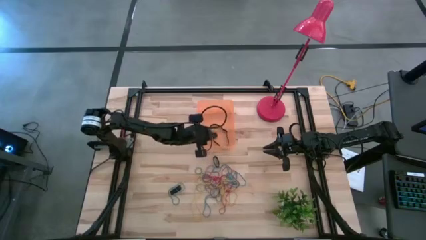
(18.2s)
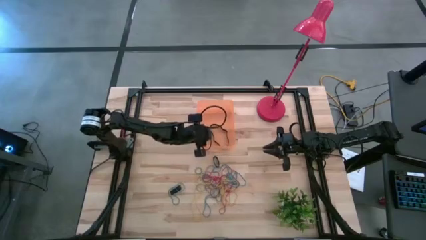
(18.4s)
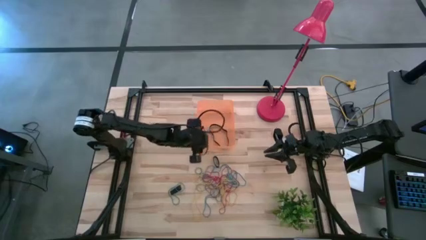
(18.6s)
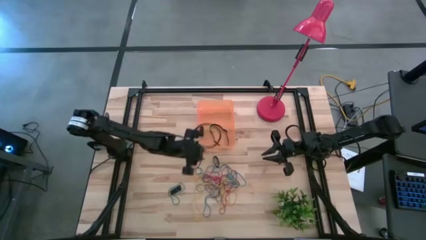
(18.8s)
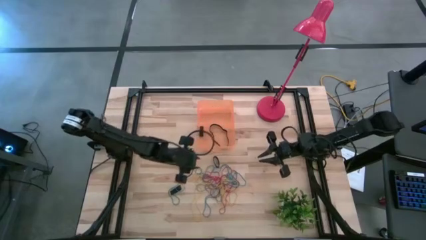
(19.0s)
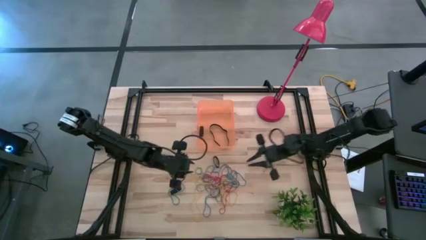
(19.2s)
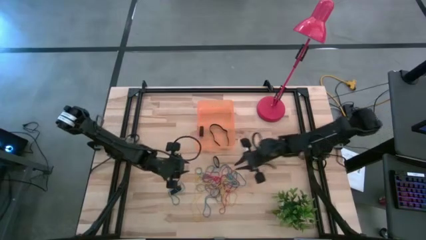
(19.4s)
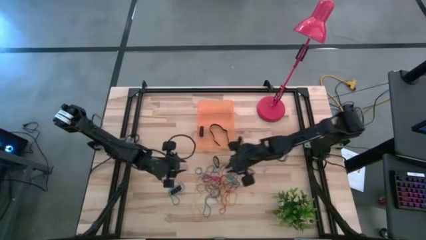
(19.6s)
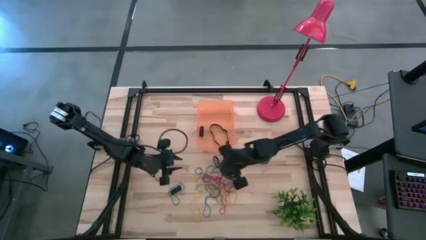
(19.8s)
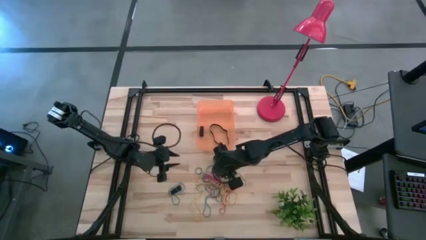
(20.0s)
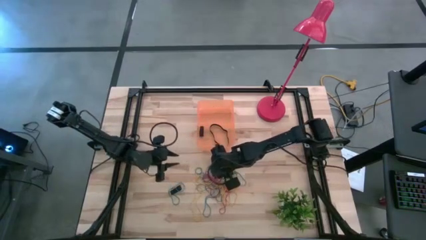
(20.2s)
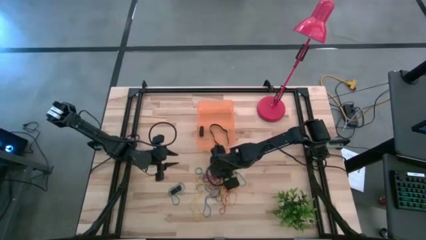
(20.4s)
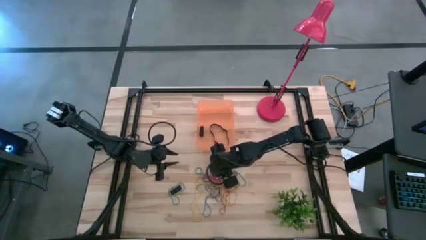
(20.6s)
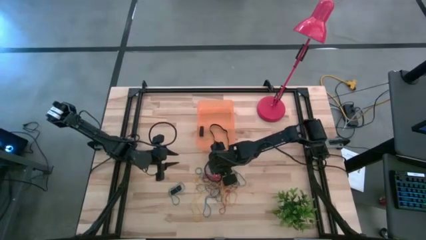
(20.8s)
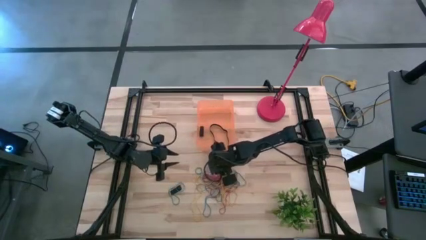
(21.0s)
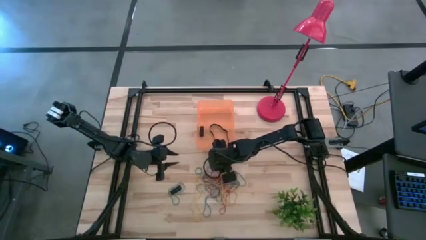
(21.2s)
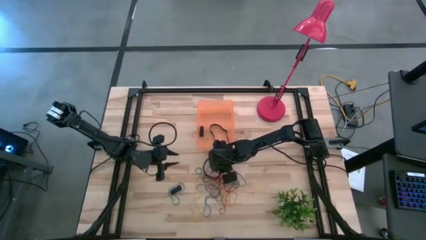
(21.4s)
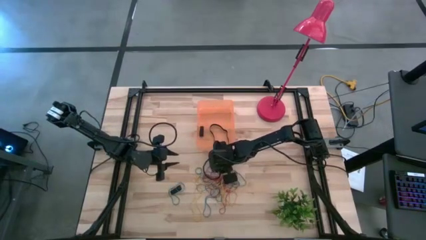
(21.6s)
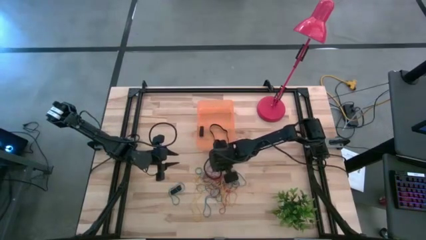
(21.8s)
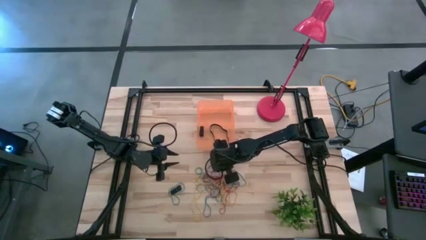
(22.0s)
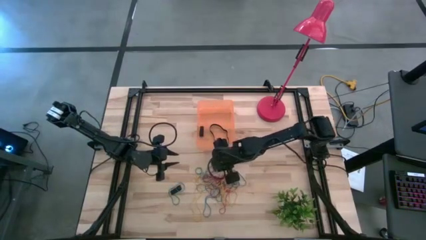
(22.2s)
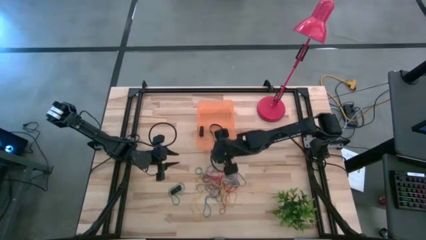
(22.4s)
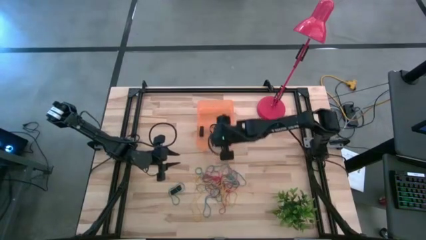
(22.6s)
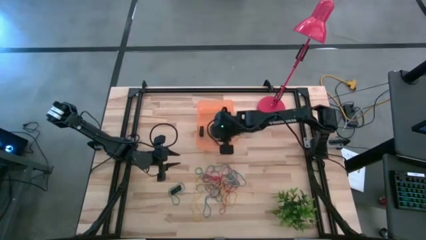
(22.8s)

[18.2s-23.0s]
Task: Pick and place rubber bands into bin
Put the black rubber band into the orange bin

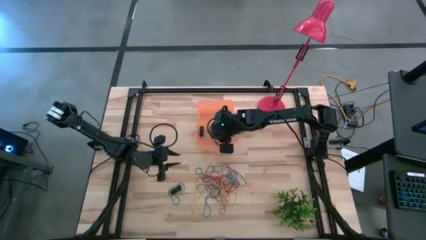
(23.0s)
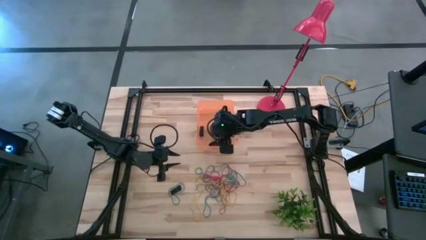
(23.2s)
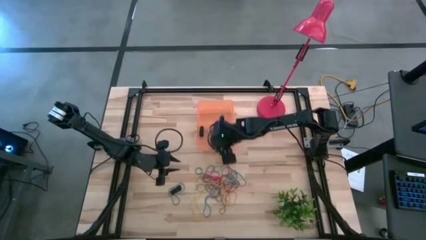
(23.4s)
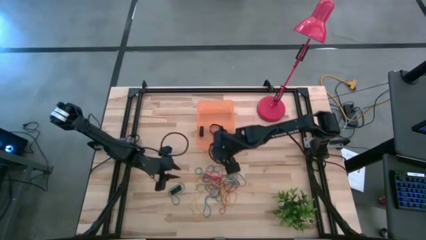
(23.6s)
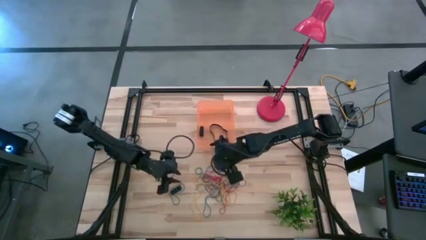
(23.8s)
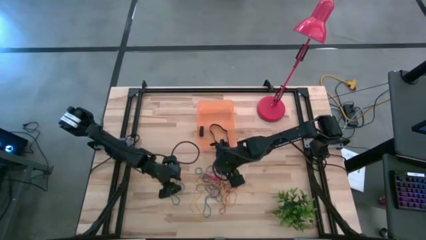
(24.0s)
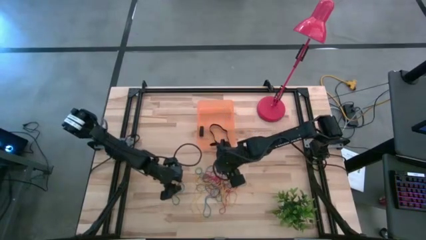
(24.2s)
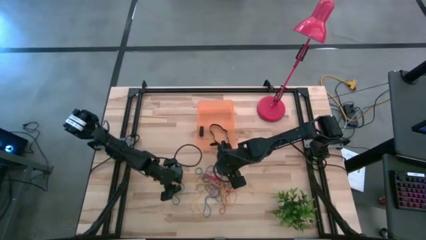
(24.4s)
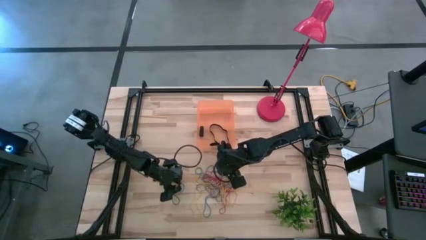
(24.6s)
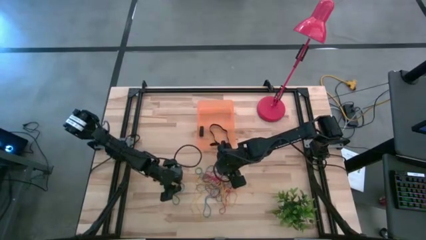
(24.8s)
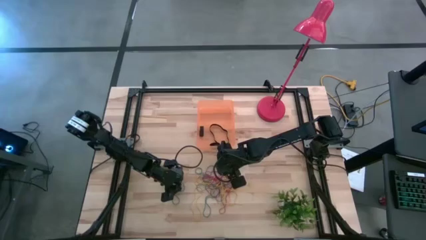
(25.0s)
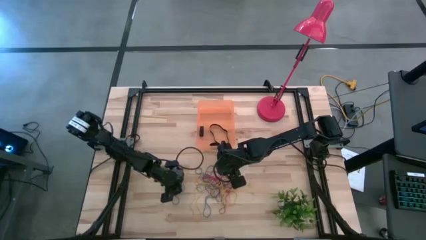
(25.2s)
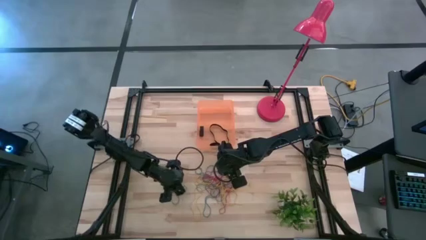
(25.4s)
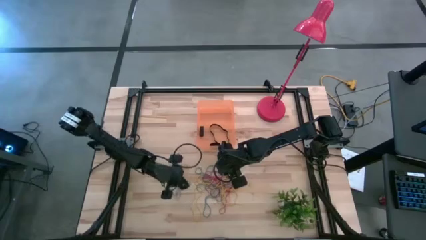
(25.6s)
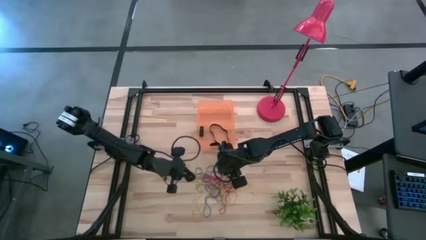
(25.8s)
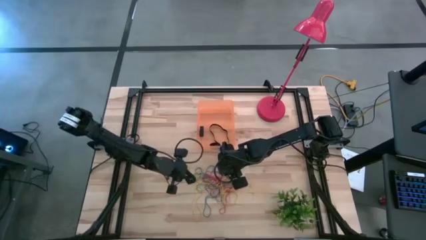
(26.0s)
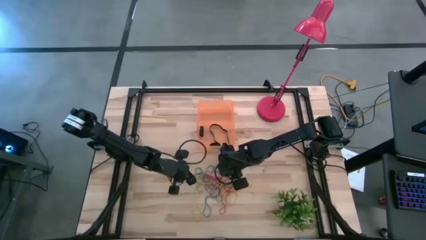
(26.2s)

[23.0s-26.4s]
Put the black rubber band into the orange bin

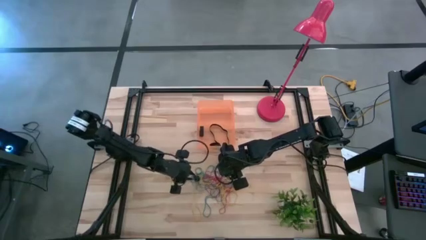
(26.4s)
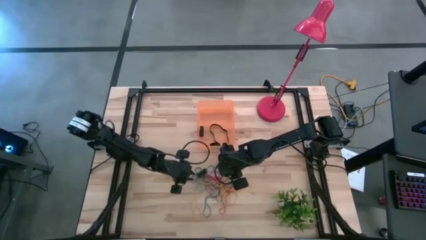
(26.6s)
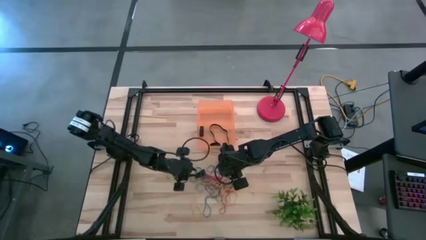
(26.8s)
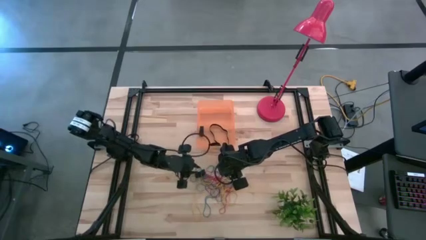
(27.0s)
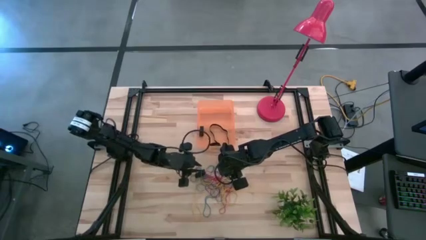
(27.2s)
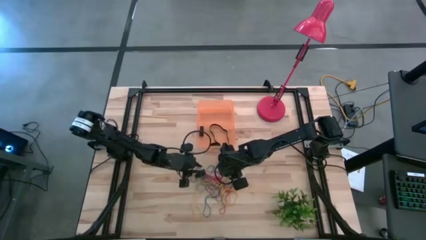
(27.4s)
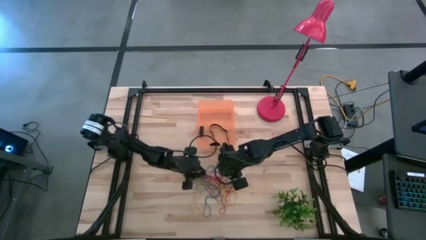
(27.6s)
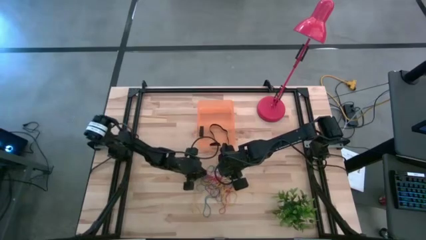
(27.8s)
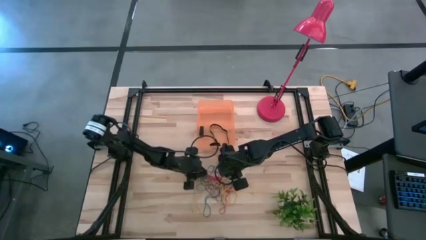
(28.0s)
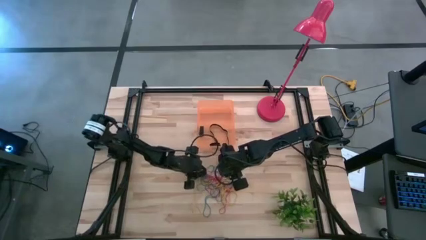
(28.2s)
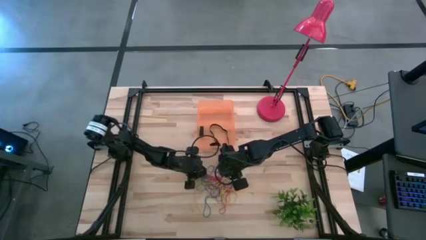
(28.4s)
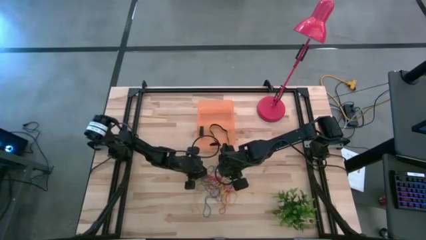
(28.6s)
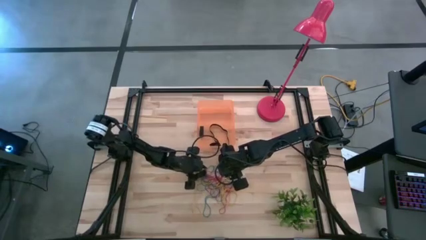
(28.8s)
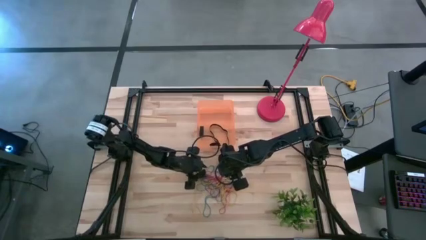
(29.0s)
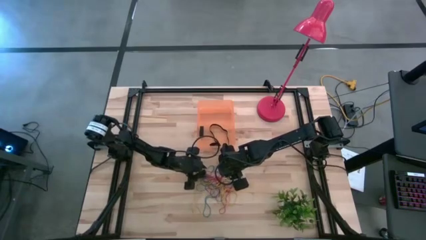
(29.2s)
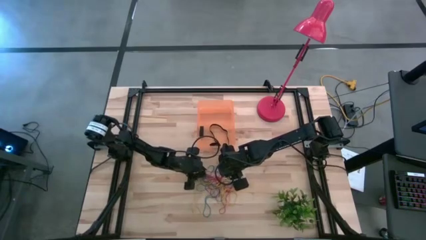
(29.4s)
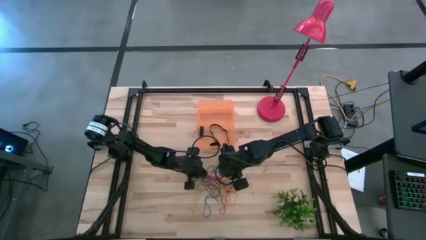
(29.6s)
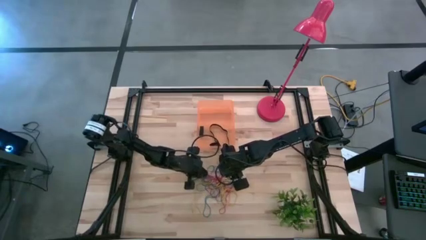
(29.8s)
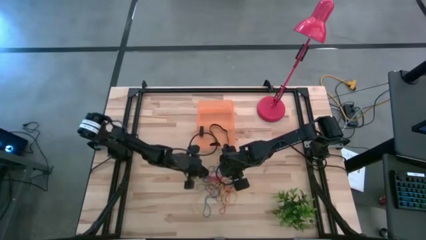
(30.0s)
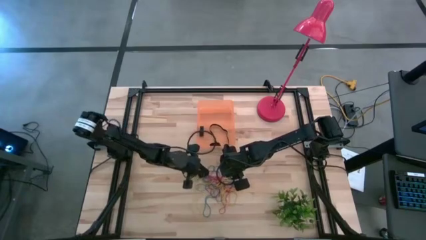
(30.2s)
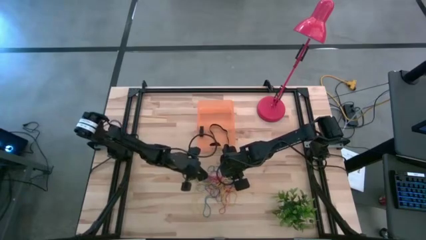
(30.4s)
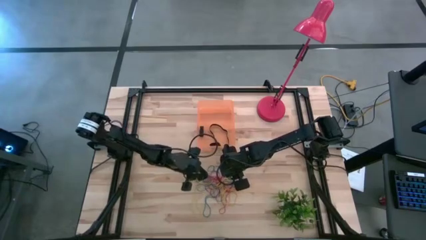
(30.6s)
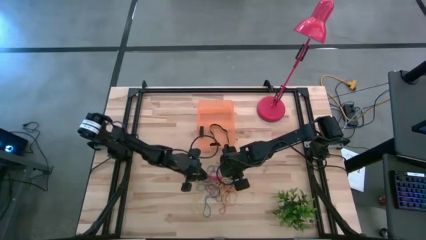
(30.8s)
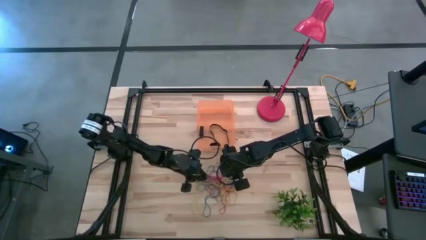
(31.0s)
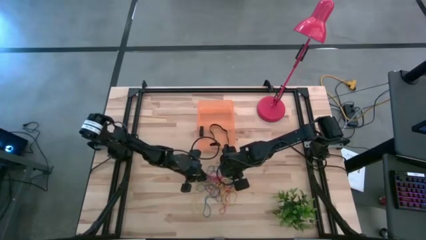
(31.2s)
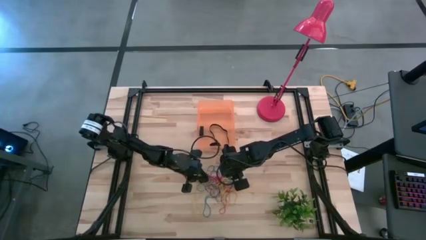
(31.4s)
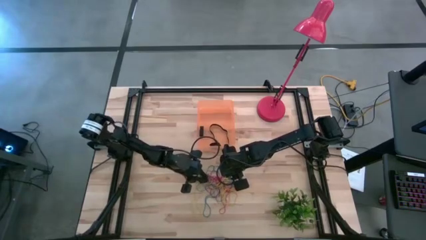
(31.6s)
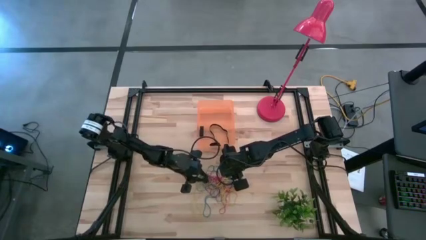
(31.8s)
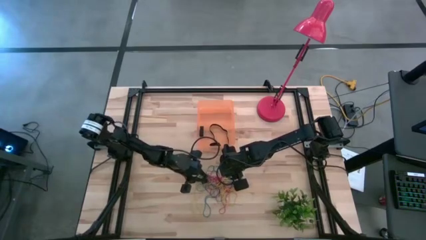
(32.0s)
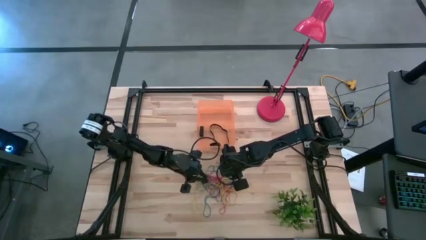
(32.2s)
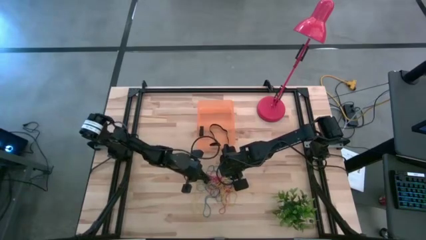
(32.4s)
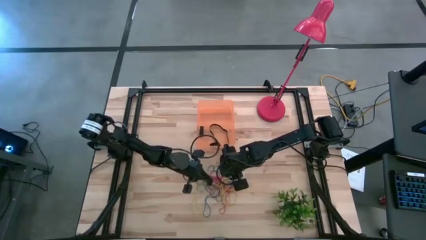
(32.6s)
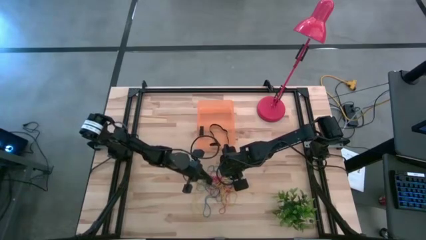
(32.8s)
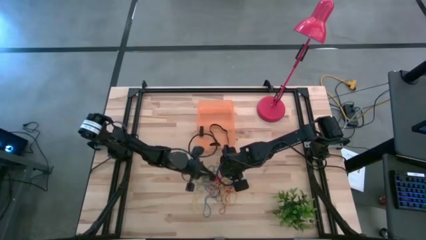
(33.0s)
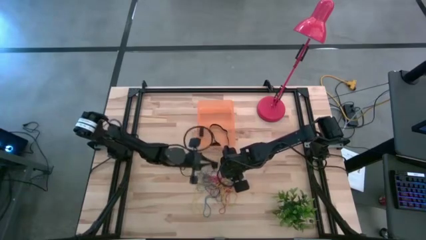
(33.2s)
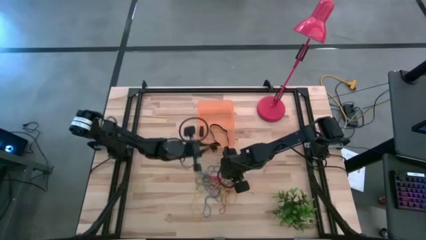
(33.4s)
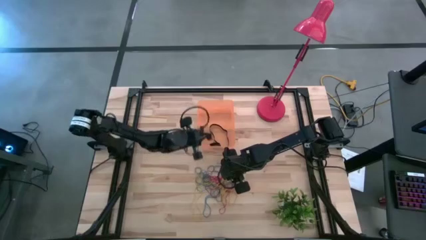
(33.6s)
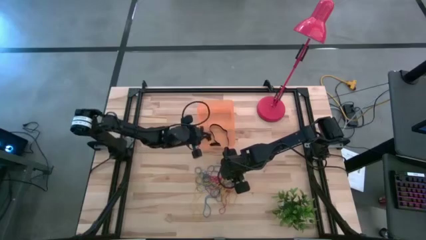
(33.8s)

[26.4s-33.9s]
Put the black rubber band into the orange bin

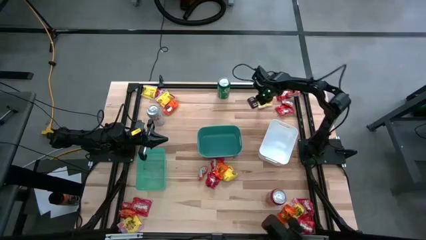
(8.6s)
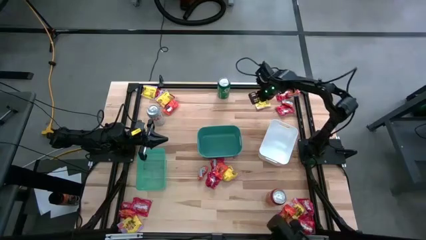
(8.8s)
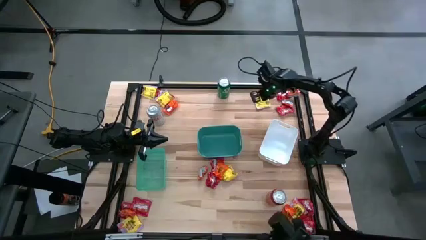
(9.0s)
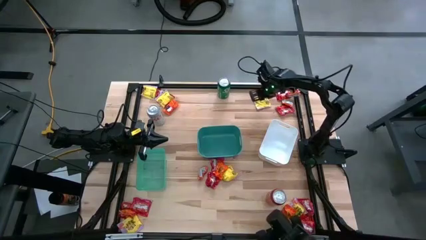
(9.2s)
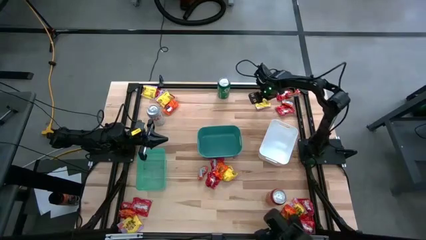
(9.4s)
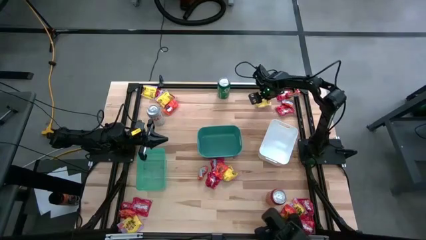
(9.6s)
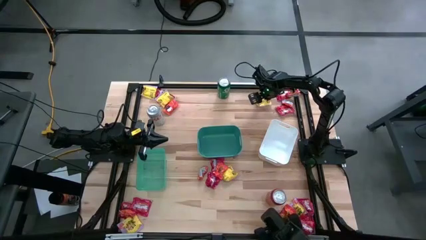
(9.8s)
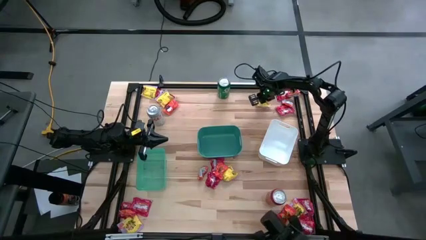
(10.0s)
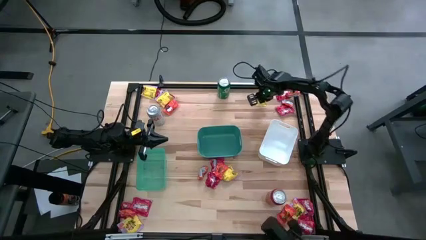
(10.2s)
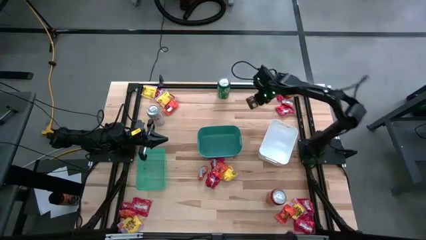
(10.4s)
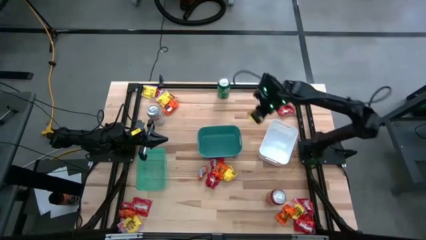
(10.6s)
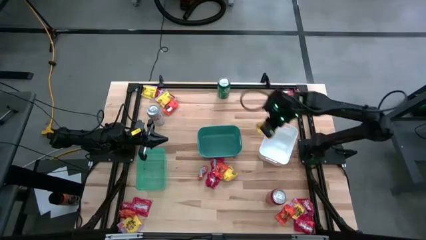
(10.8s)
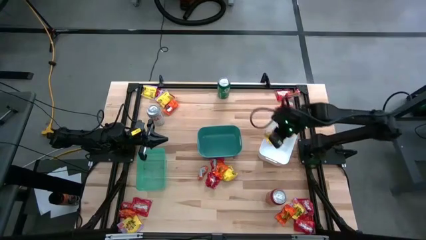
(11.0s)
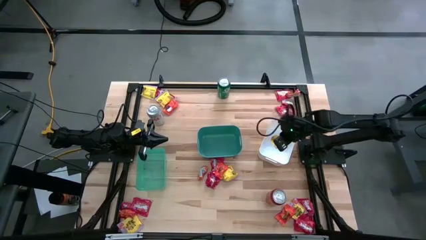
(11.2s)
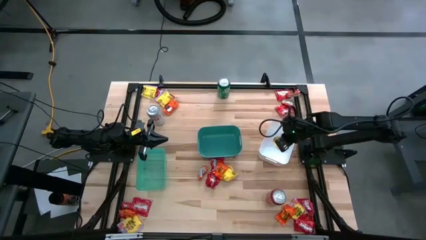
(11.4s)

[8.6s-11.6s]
Task: Sort candy
Put the yellow candy into the white bin
